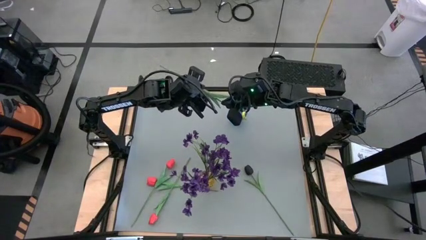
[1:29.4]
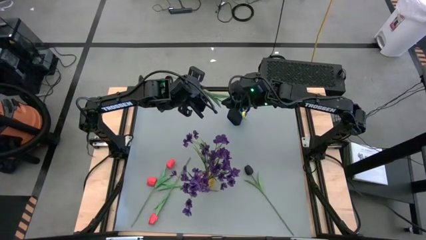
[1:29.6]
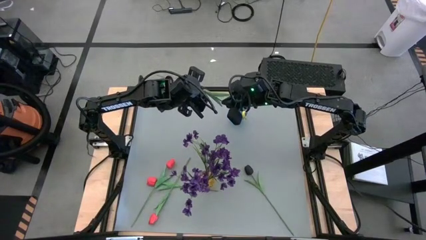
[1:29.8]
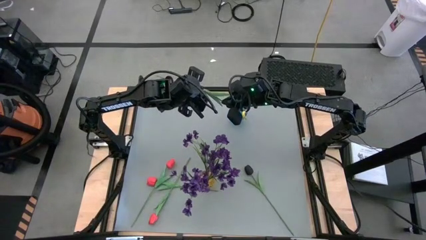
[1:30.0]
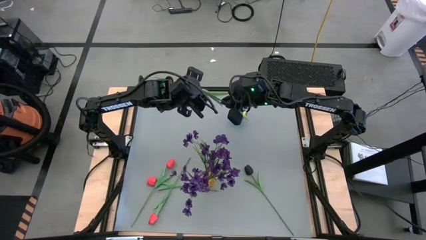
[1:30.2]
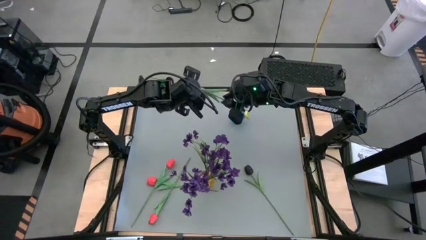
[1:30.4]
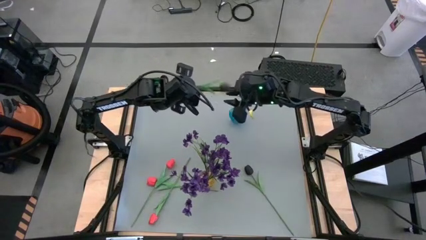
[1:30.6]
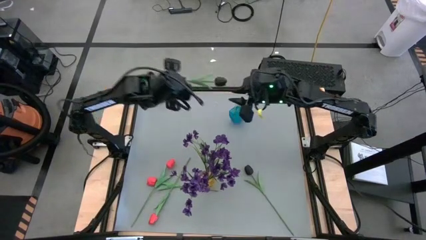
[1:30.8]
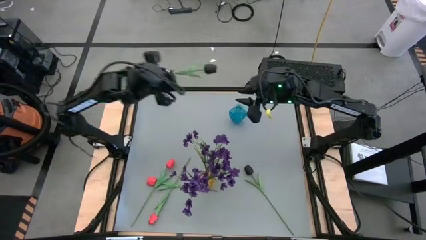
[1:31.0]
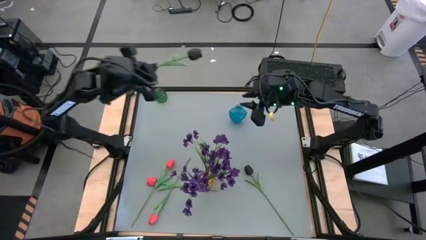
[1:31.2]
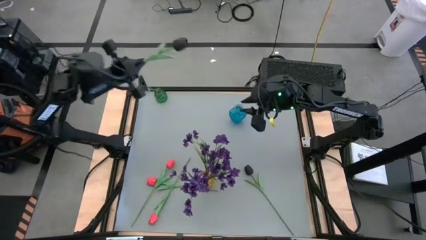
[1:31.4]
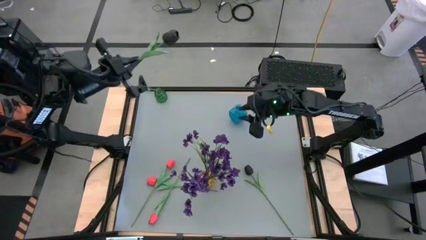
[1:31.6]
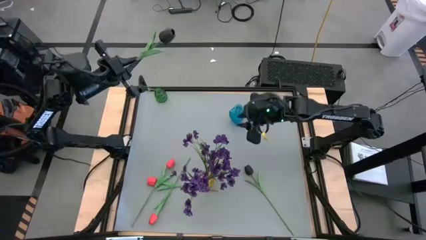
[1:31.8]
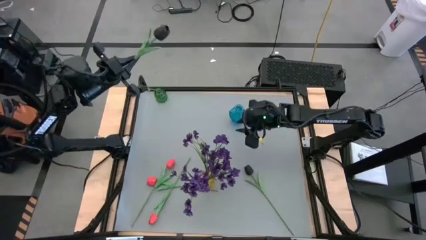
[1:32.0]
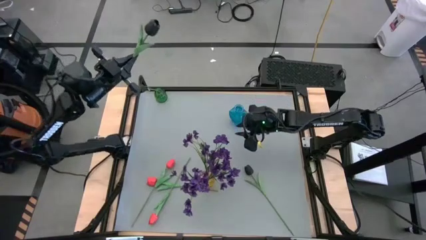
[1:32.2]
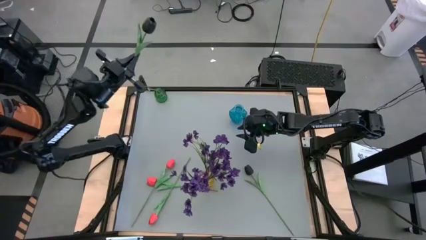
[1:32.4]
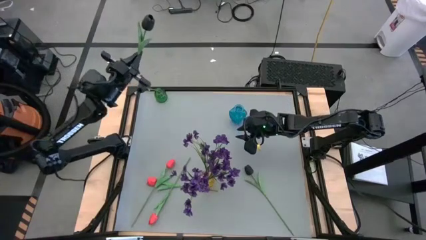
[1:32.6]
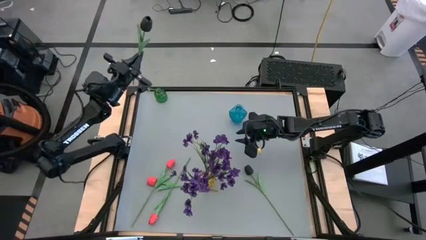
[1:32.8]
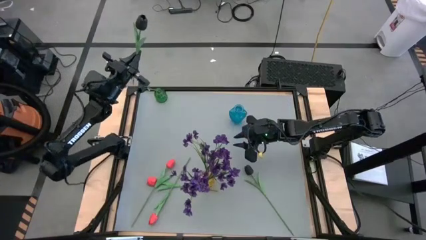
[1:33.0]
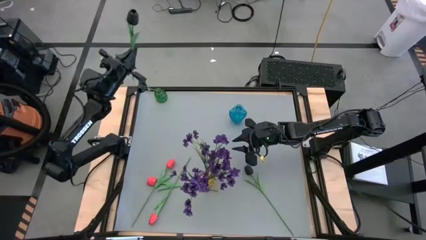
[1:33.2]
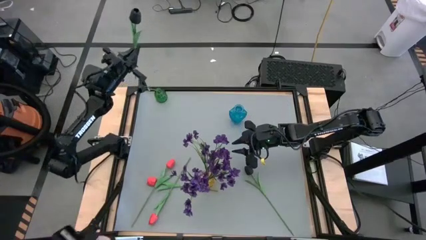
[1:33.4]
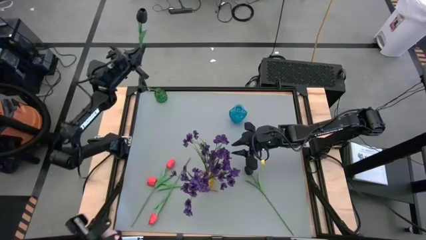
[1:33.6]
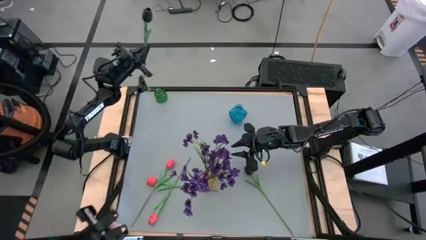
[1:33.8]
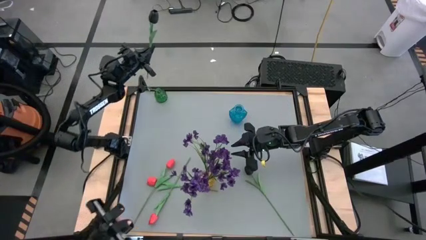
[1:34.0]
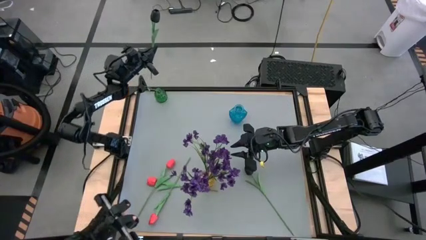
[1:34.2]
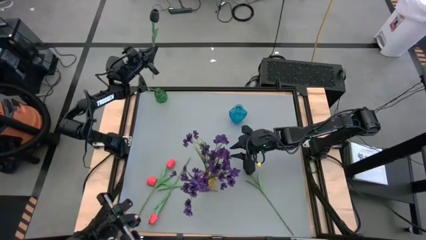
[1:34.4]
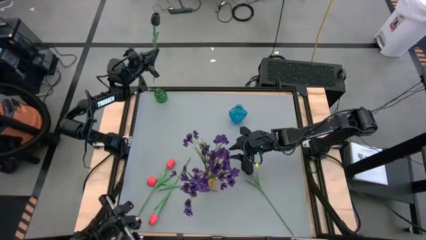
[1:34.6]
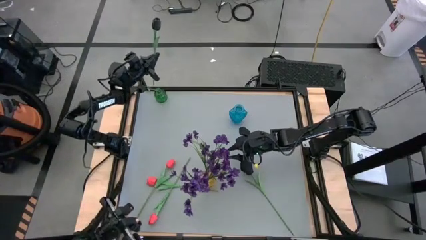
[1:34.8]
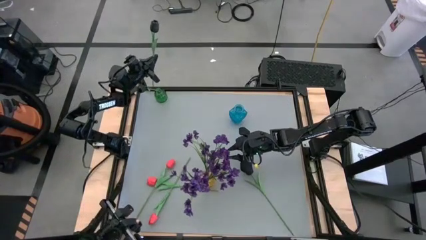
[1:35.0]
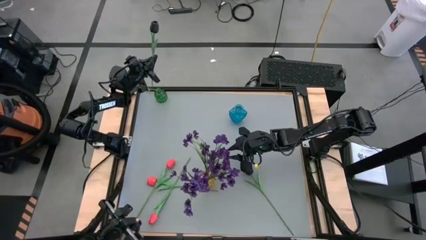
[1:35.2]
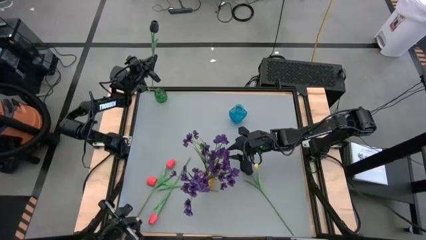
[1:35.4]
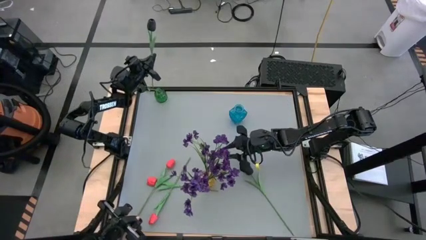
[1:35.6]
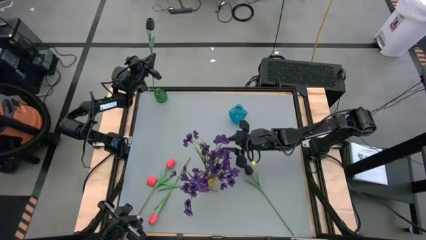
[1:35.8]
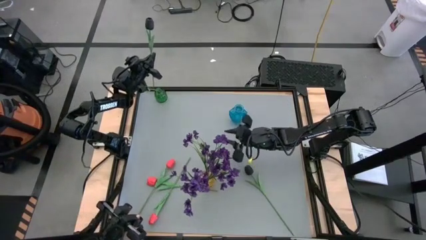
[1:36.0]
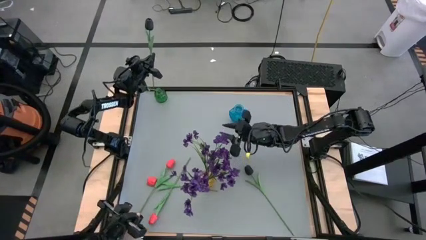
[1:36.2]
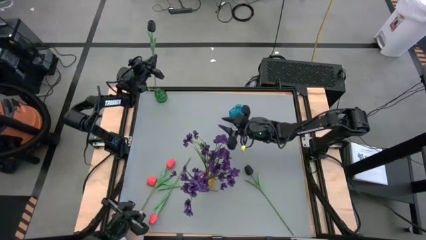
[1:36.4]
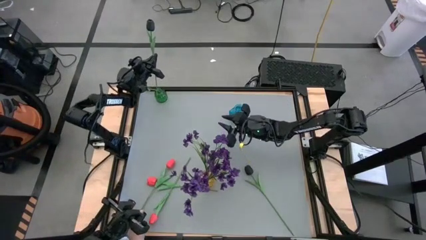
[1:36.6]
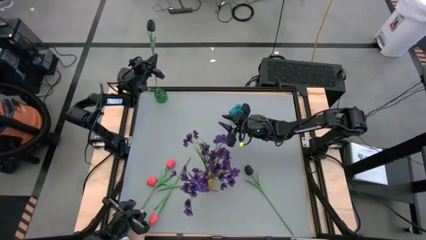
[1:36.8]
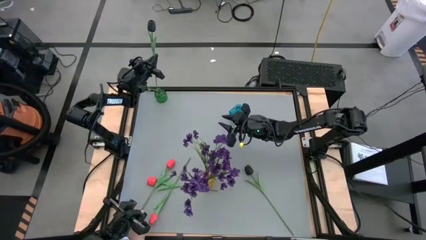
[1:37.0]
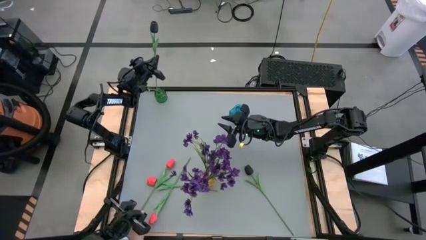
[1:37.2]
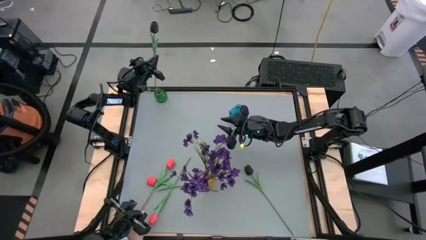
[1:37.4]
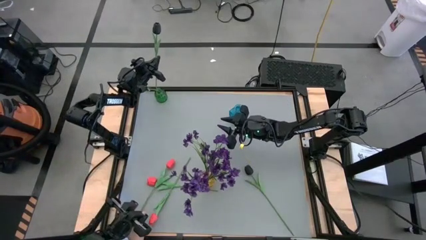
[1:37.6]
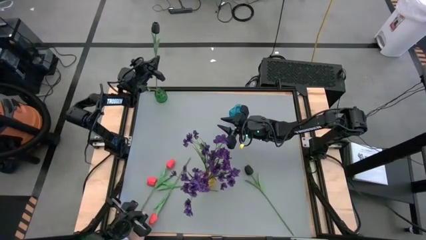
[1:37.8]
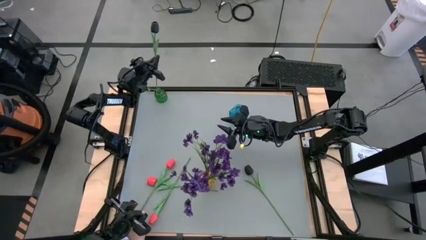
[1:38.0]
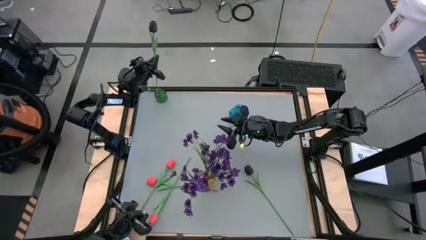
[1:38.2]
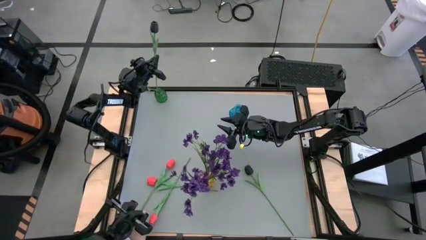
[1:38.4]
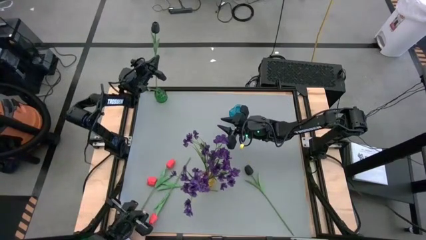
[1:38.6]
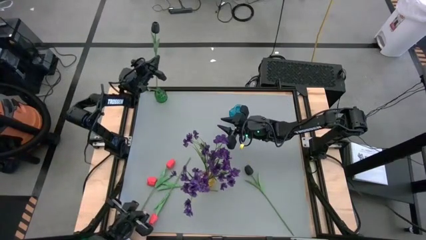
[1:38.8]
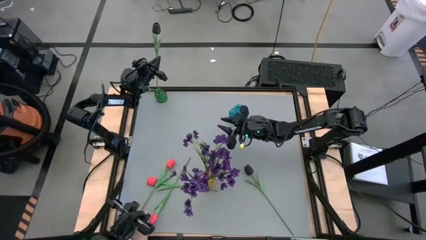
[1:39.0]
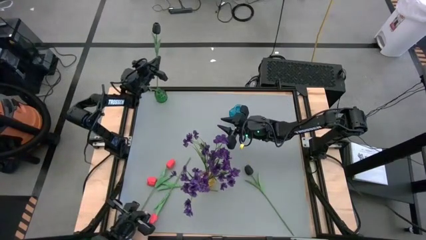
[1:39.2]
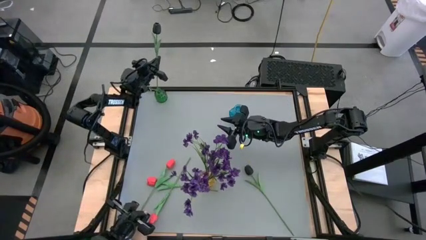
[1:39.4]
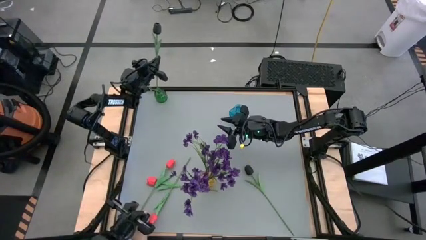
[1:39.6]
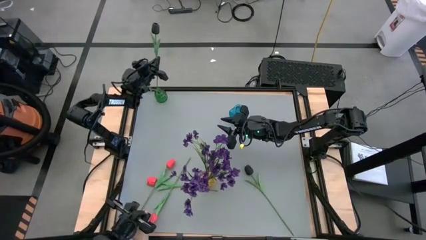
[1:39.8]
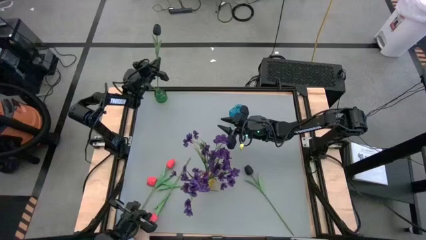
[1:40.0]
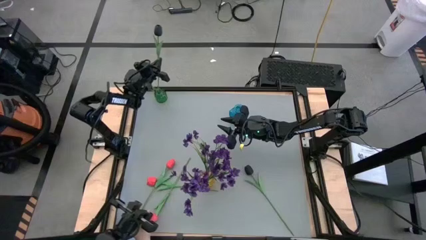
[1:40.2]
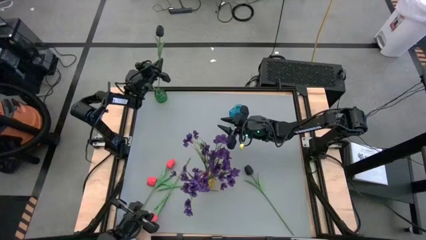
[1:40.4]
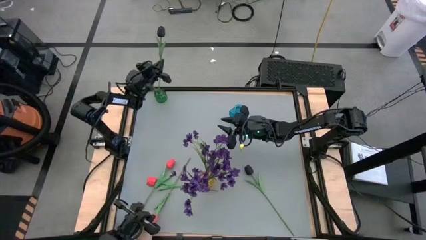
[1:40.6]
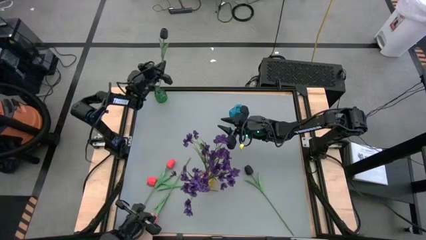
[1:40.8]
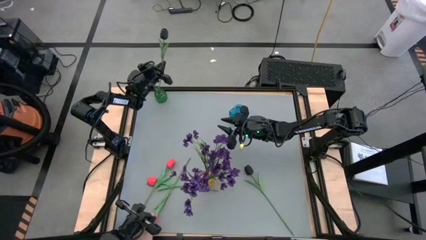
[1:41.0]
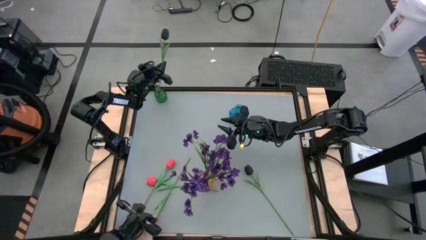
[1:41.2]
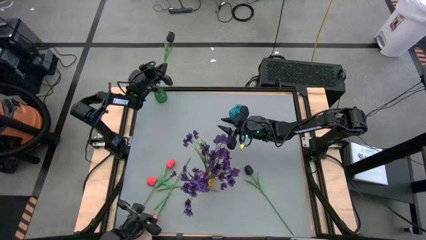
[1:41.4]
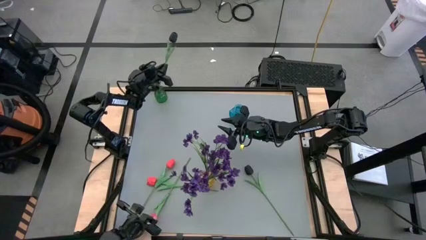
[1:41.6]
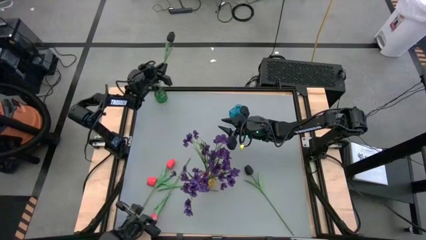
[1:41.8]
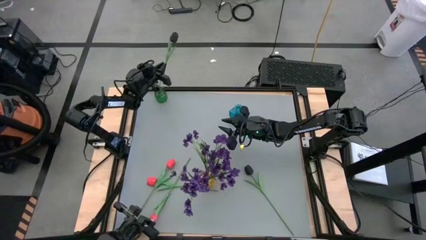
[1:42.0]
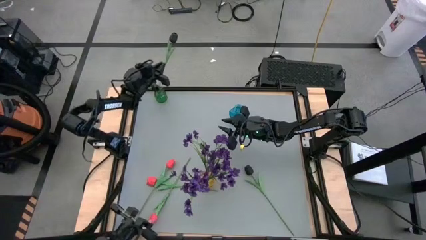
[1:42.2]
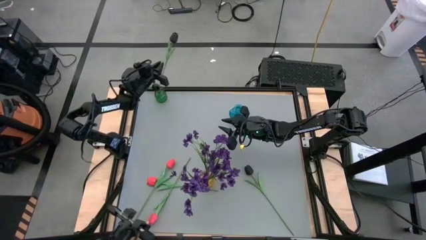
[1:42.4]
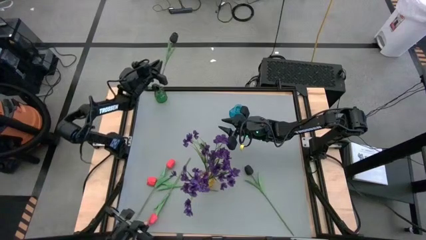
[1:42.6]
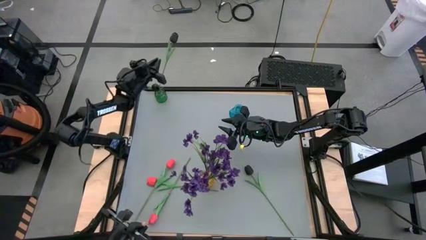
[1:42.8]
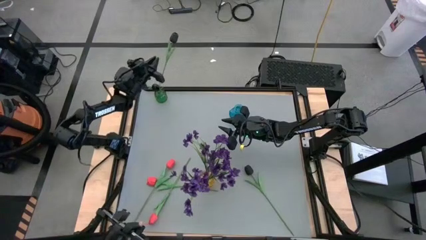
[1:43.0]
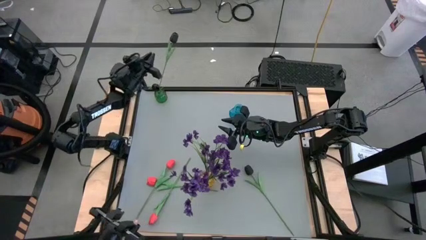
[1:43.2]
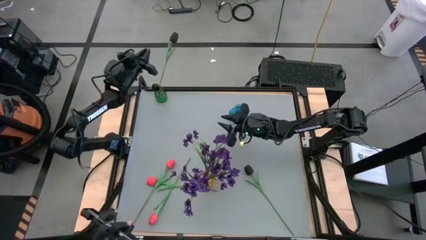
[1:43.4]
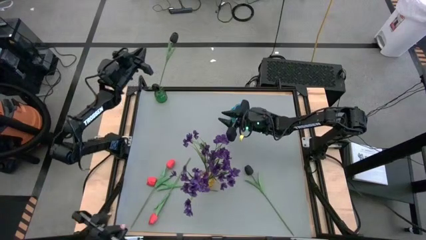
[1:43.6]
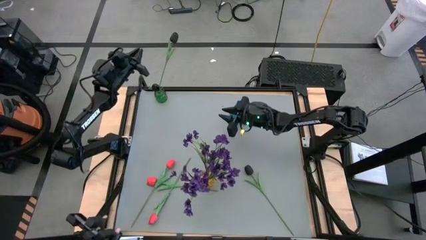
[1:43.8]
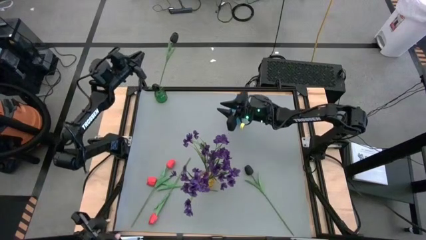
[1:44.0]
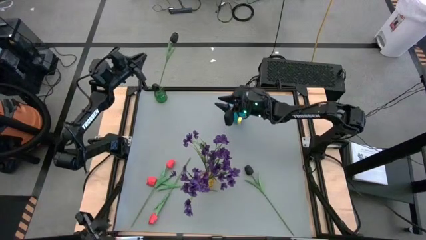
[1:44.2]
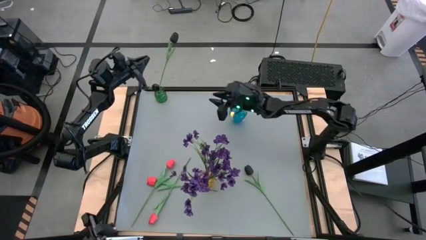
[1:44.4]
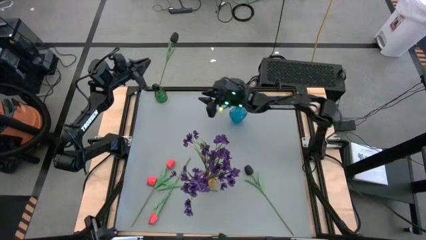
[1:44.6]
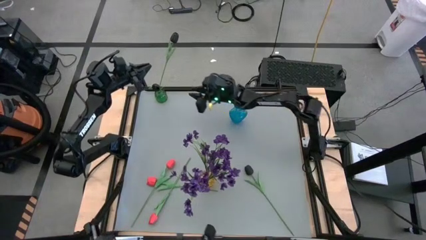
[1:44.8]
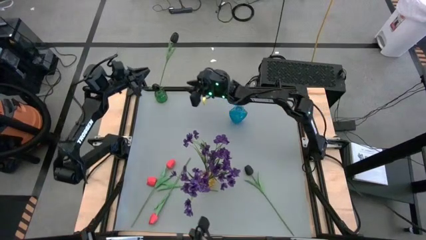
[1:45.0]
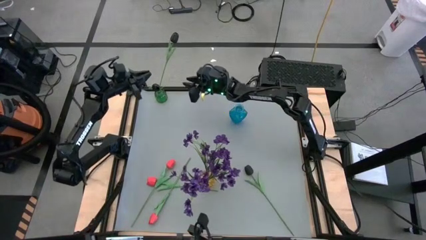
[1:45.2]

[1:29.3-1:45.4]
Task: Sort flowers into vase by color
Put the bottom black flower into the green vase
